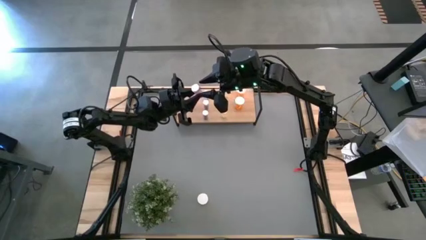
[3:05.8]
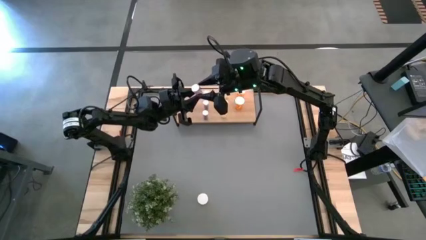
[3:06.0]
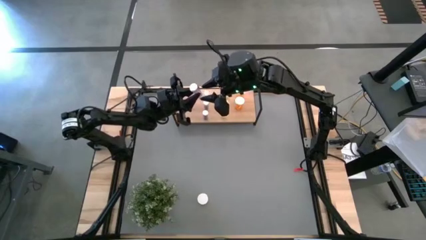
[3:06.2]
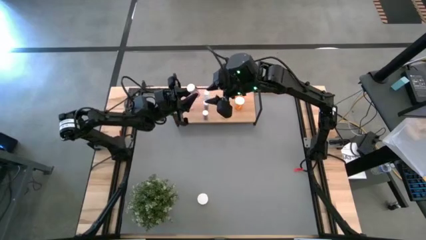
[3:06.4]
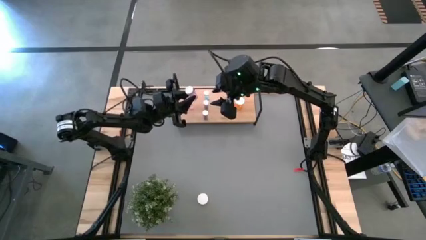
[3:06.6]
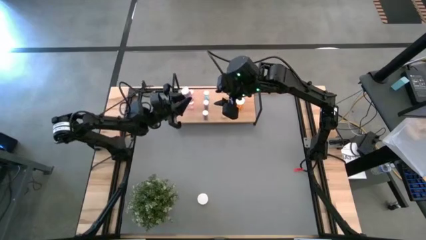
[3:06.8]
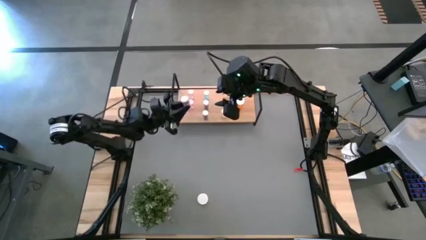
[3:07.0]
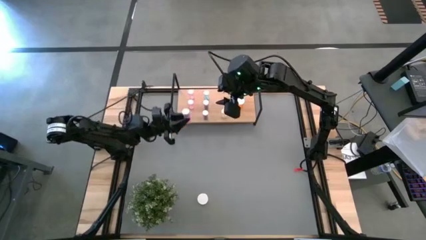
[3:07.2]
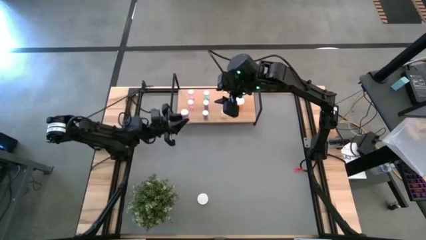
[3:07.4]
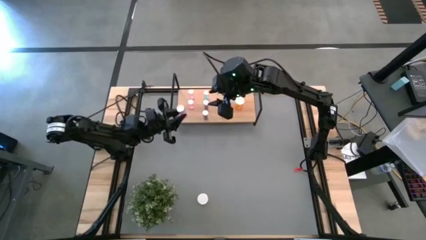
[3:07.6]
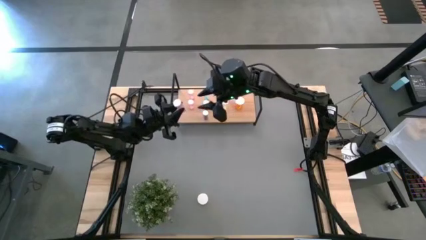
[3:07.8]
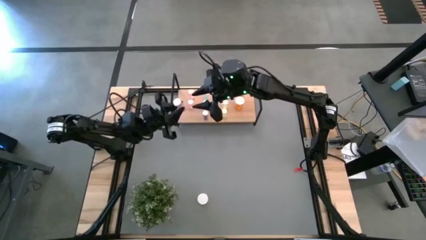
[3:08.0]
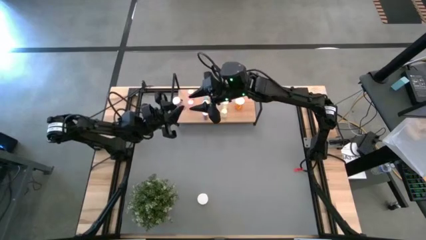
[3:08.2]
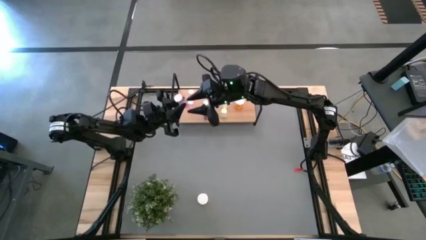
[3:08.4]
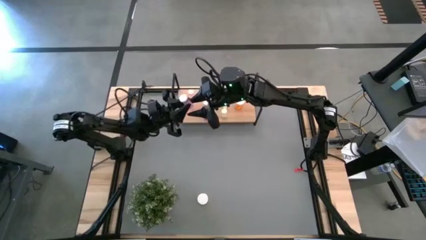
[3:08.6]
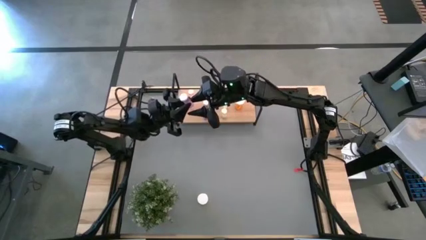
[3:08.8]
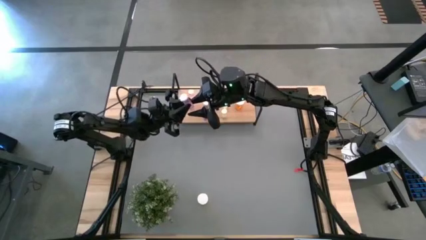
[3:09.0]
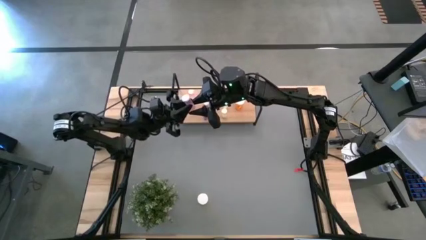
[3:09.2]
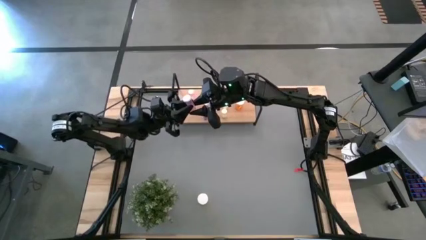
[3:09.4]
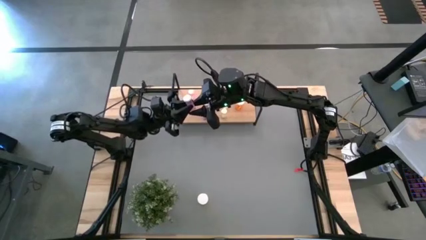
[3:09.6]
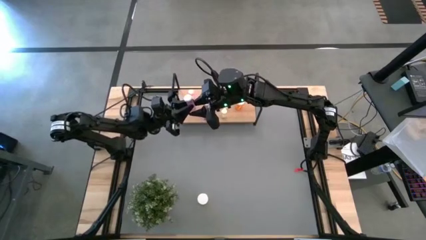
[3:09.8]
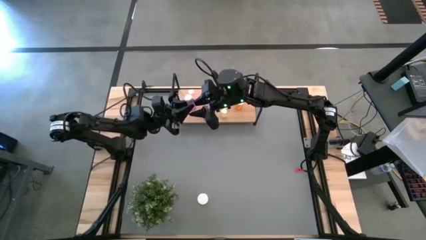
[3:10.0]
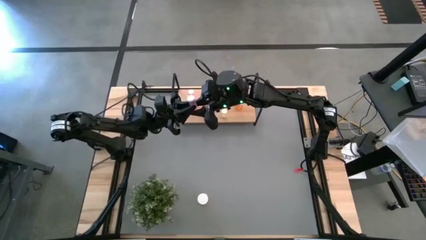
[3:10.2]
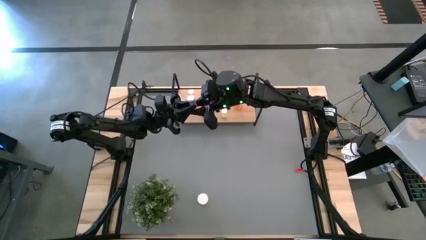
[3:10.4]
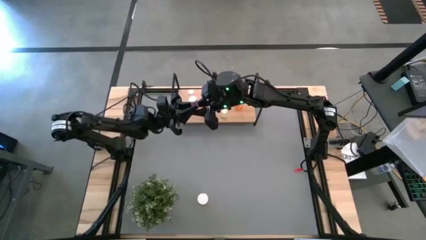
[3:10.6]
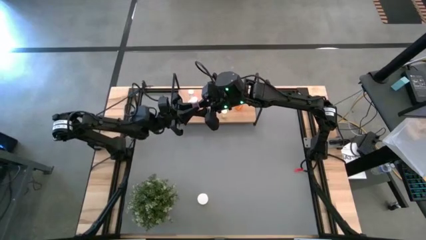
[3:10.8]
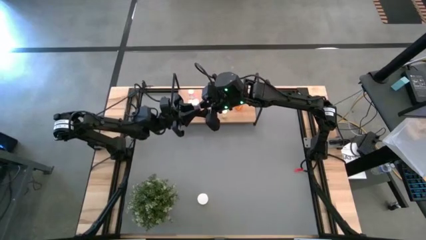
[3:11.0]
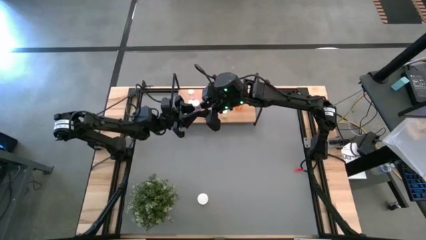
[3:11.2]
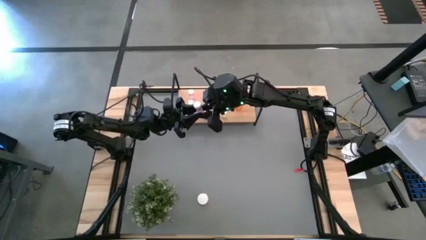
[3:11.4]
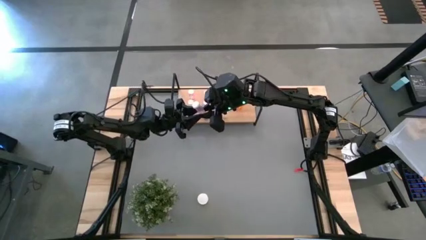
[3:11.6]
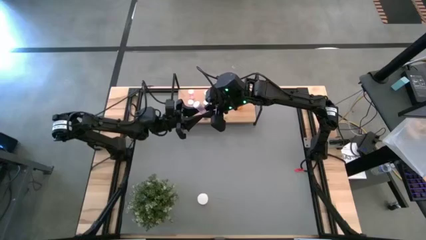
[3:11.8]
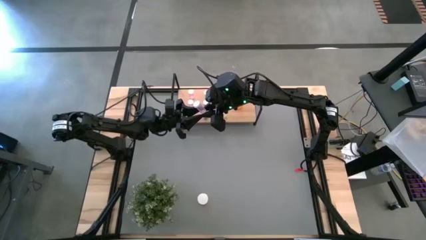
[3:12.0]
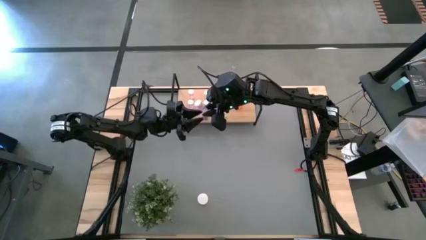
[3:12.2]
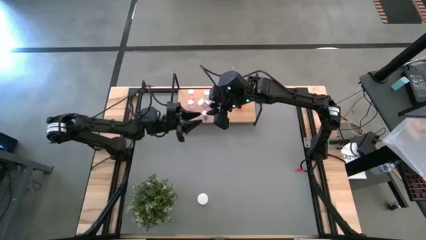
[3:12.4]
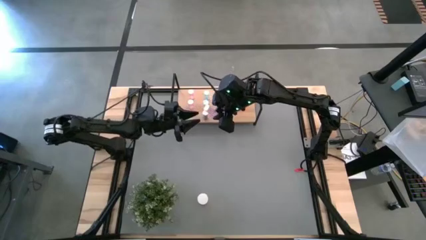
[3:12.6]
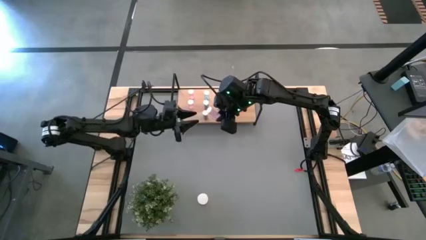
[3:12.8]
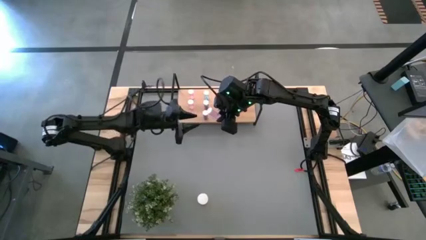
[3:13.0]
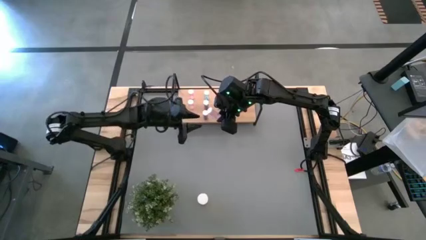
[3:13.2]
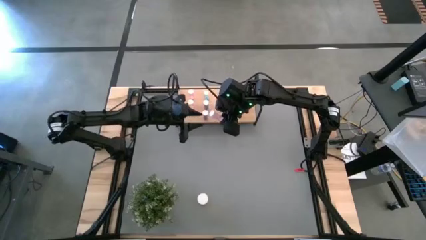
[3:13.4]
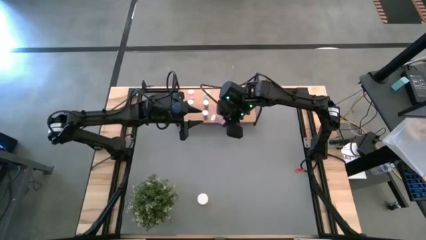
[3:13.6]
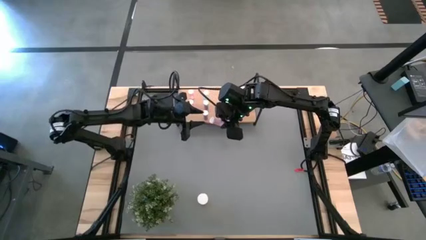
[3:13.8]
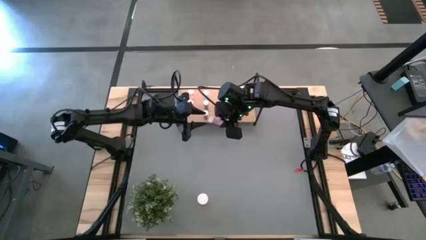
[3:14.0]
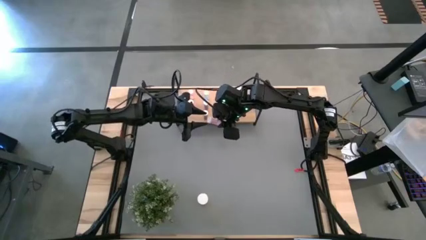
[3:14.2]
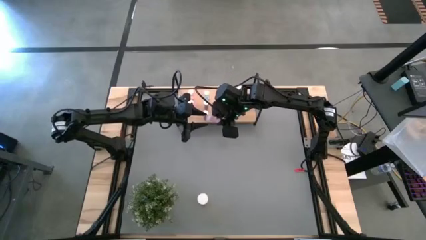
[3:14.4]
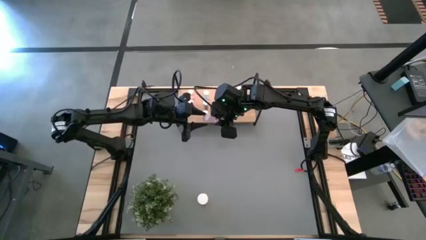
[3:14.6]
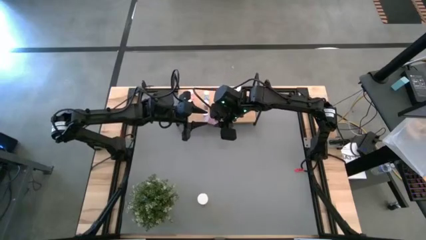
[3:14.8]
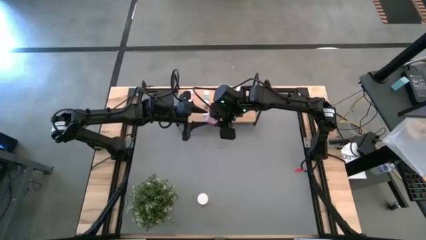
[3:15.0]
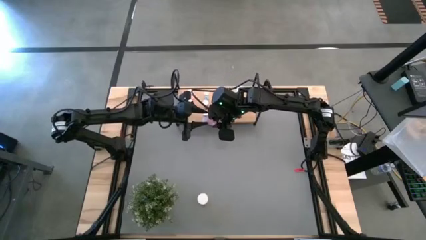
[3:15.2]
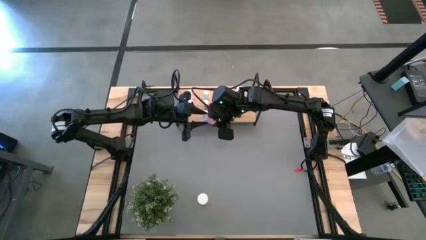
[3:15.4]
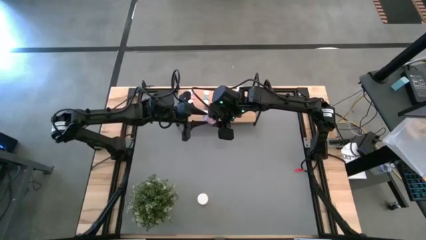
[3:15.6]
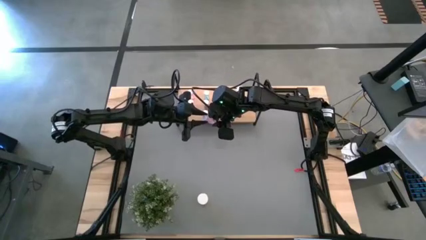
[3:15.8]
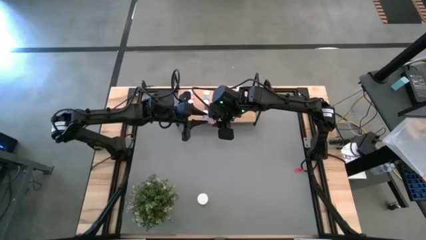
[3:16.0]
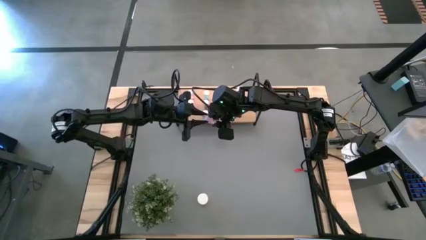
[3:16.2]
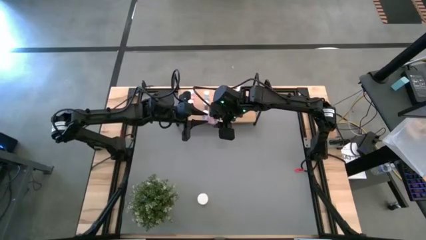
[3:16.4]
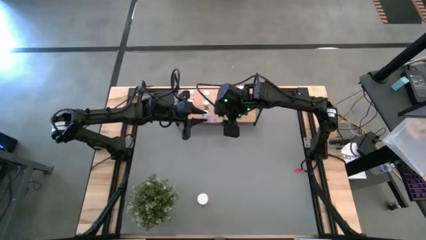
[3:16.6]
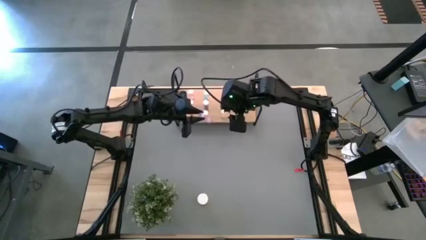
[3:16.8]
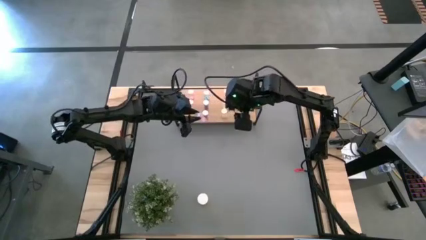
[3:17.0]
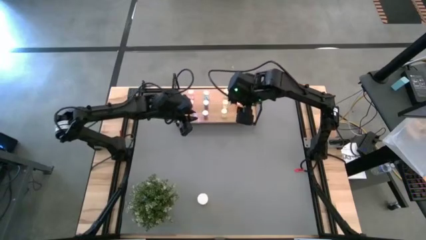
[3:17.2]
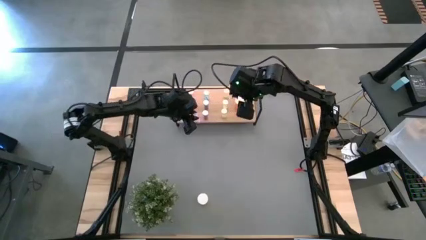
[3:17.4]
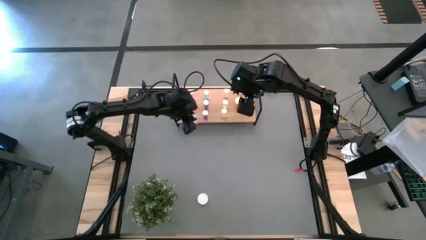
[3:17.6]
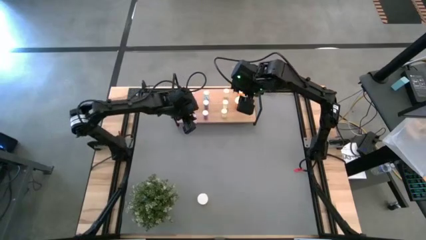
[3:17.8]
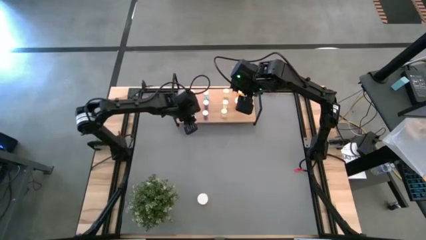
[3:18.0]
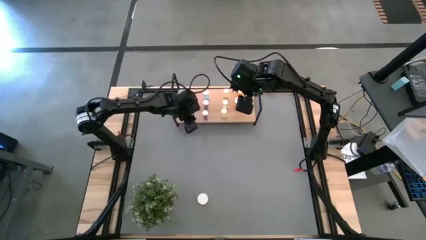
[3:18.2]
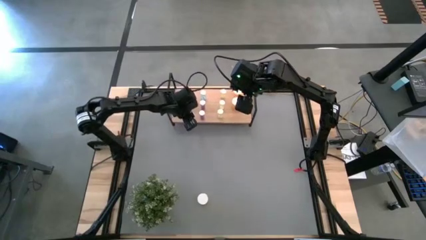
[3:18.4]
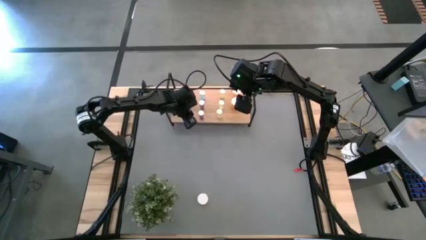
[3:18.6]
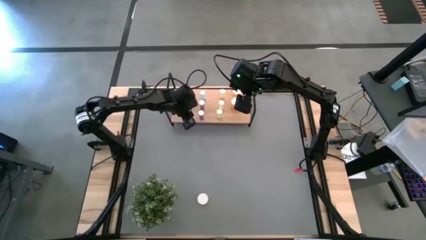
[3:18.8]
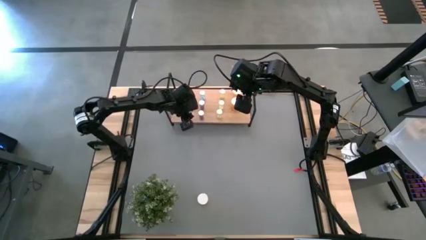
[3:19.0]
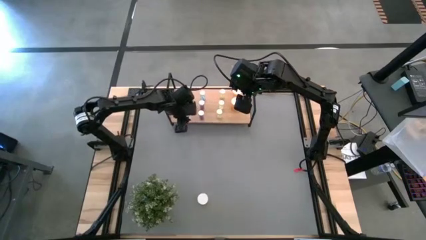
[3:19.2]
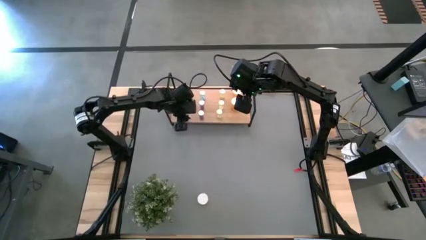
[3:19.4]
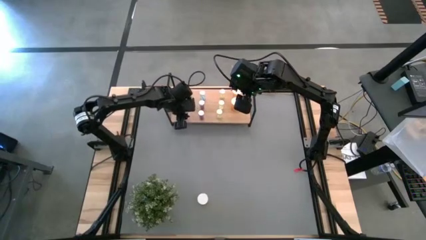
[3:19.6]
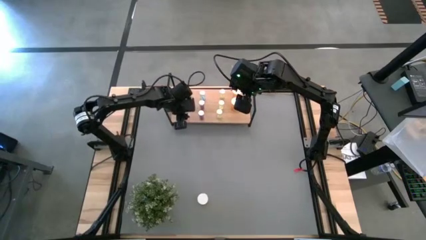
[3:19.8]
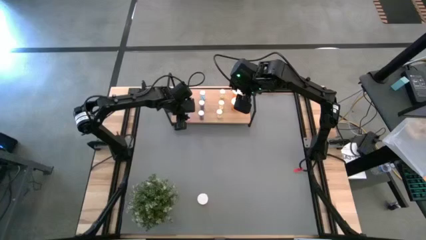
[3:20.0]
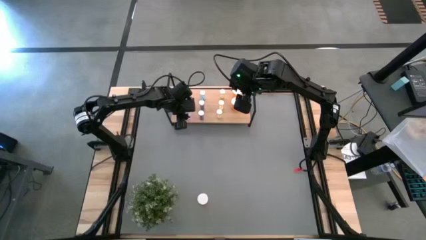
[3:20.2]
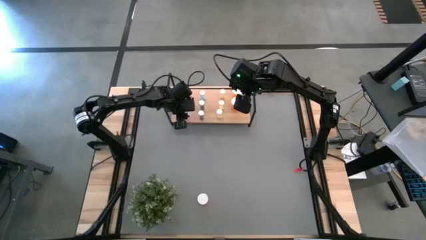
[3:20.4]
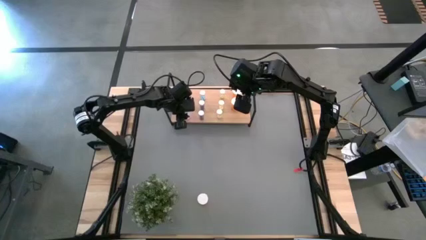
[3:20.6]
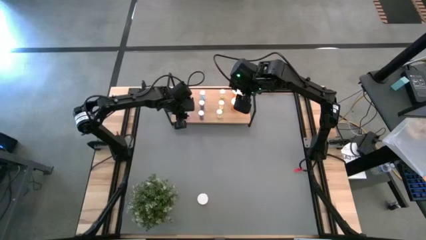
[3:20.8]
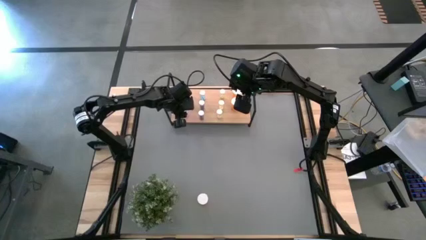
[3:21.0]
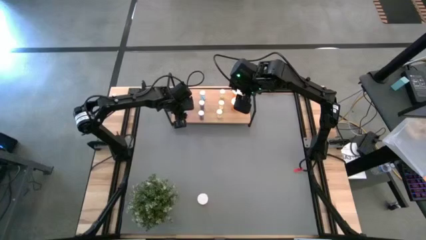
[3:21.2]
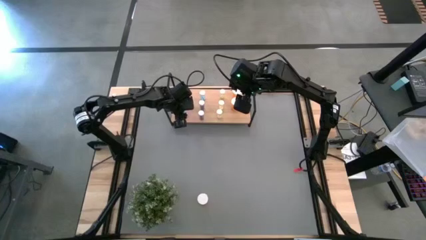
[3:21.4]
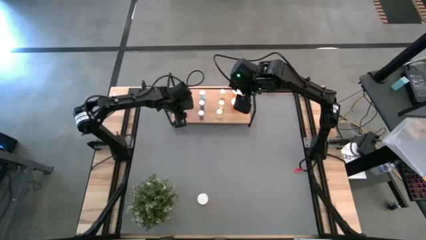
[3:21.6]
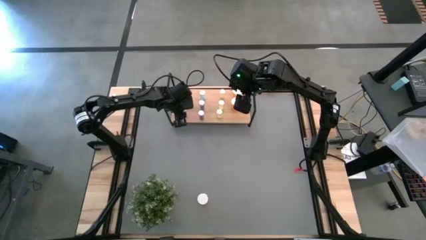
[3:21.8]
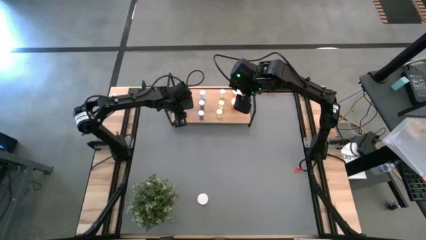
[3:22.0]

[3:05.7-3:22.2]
Task: Pick and place medicine bottles onto shelf by color
Put the pink pill bottle on the shelf aligned with the other pink pill bottles
